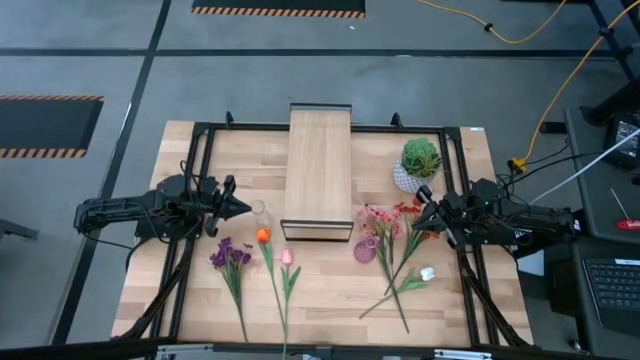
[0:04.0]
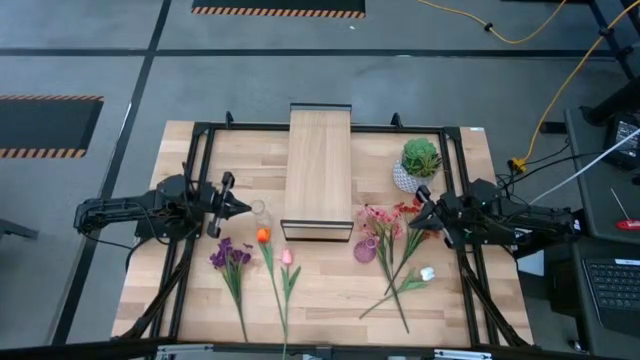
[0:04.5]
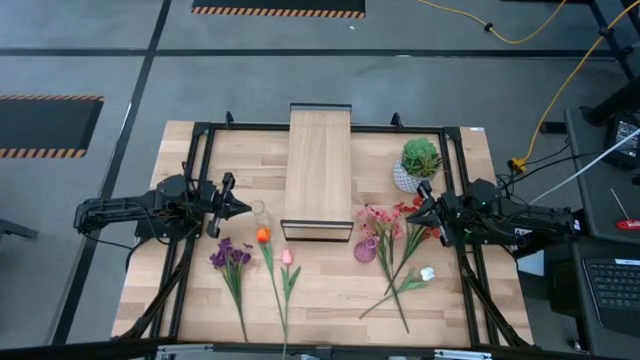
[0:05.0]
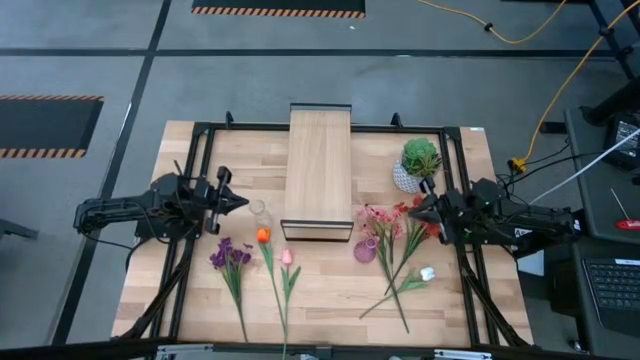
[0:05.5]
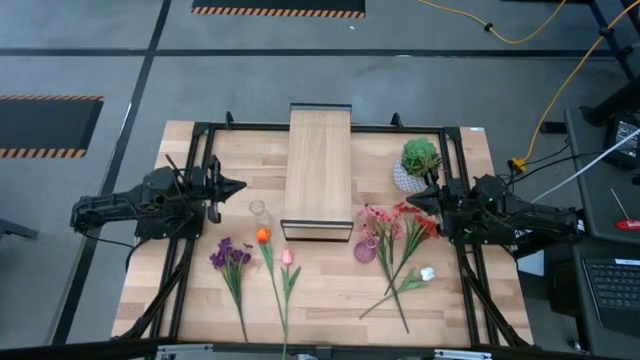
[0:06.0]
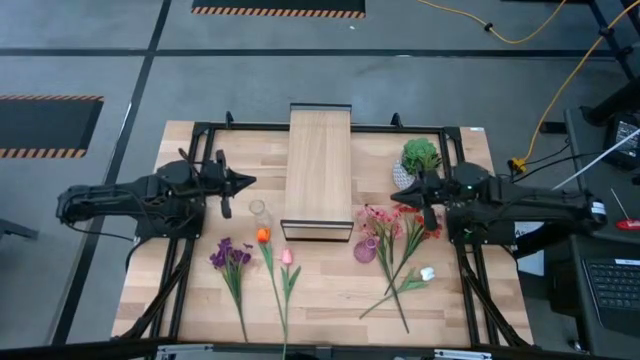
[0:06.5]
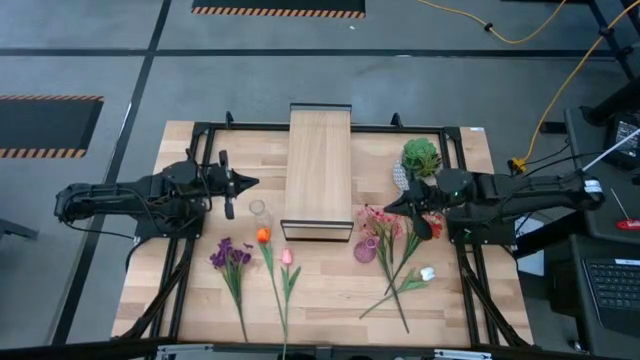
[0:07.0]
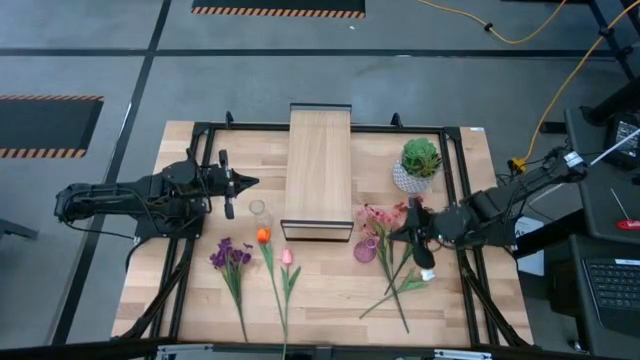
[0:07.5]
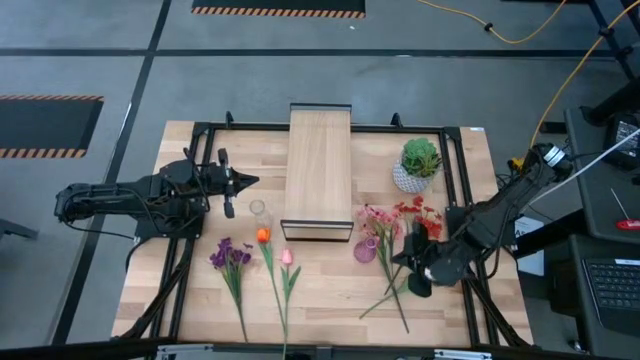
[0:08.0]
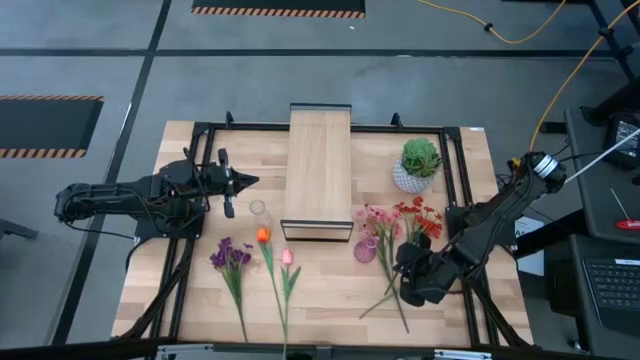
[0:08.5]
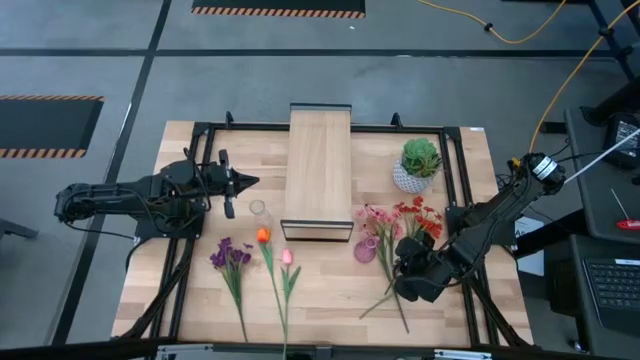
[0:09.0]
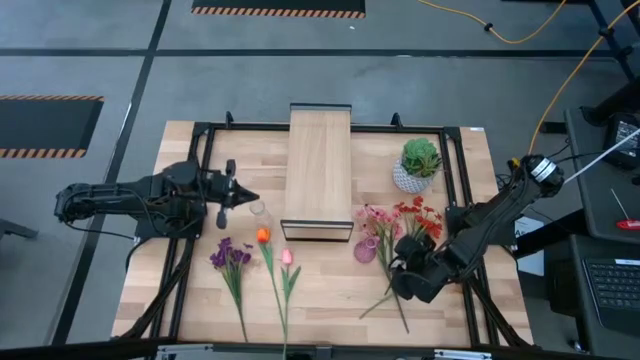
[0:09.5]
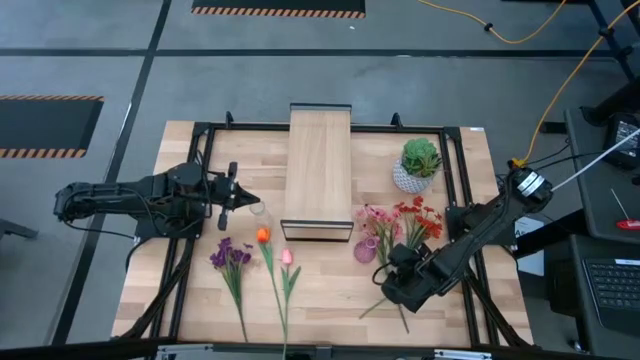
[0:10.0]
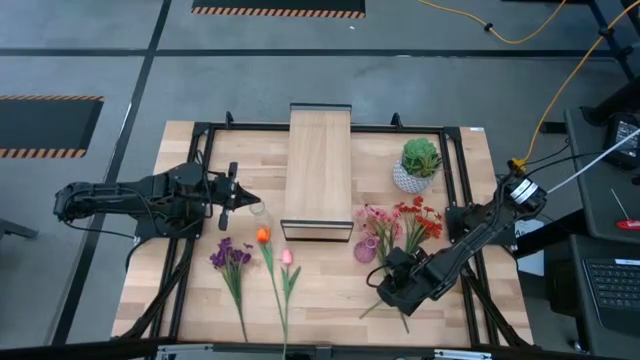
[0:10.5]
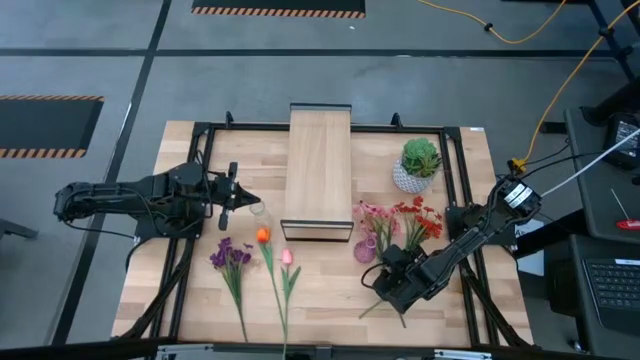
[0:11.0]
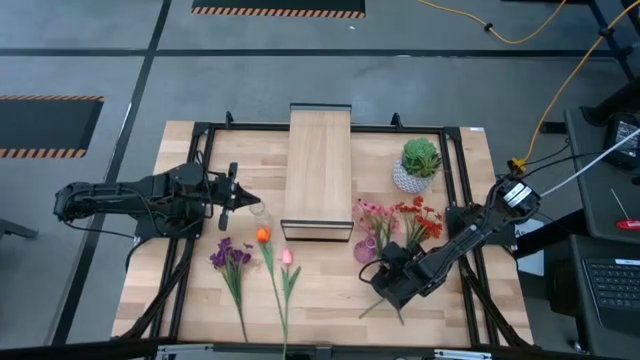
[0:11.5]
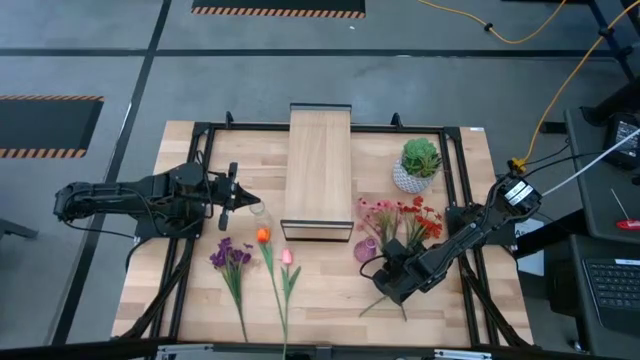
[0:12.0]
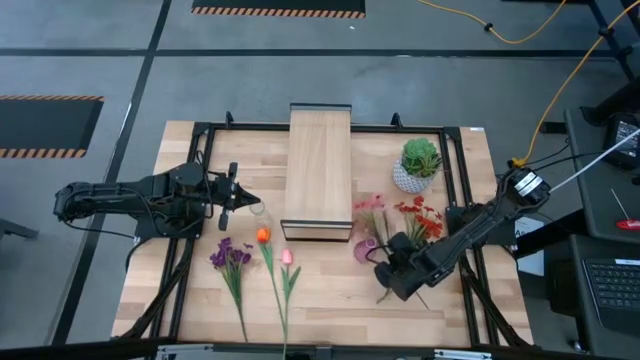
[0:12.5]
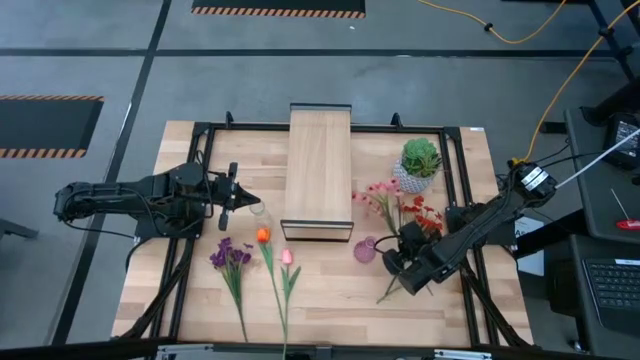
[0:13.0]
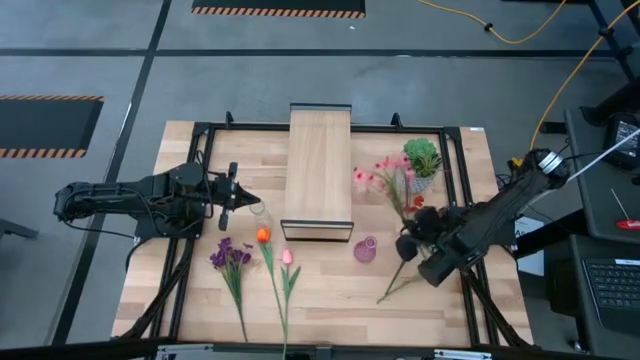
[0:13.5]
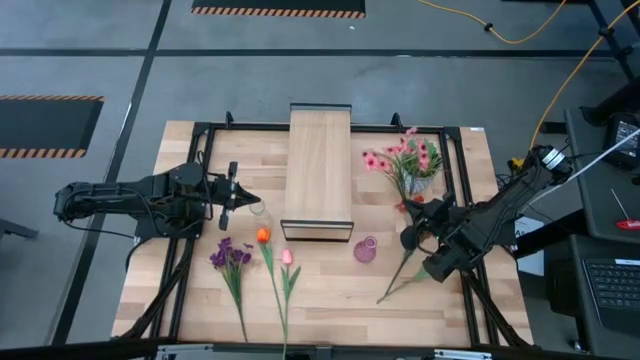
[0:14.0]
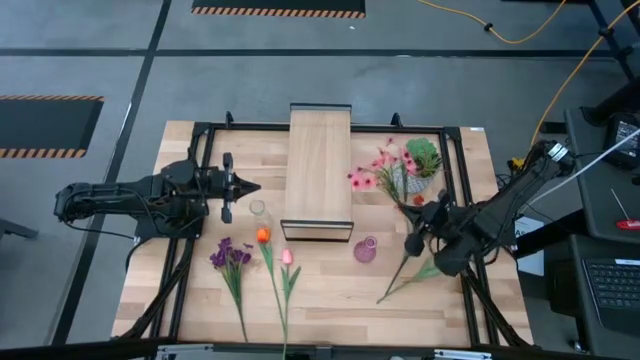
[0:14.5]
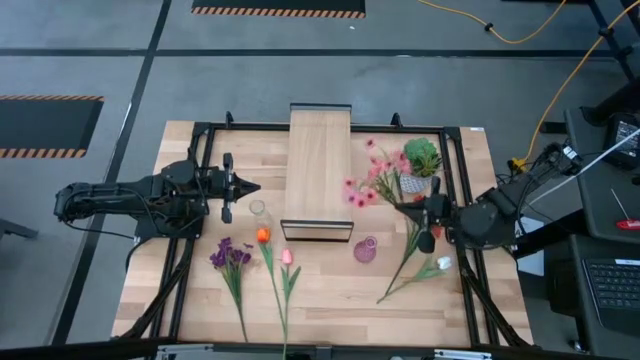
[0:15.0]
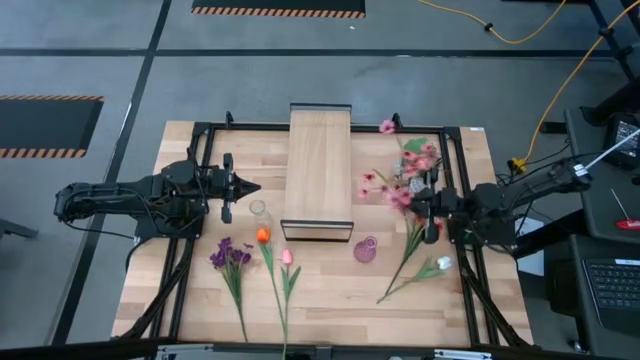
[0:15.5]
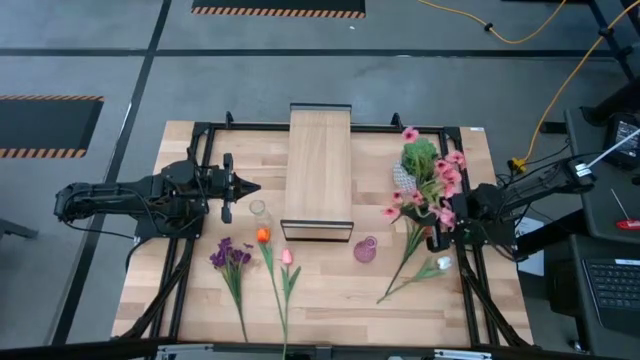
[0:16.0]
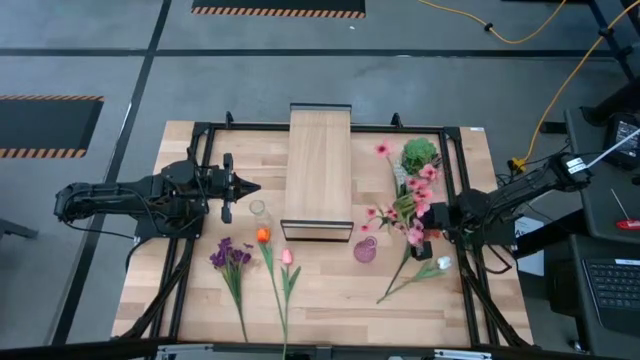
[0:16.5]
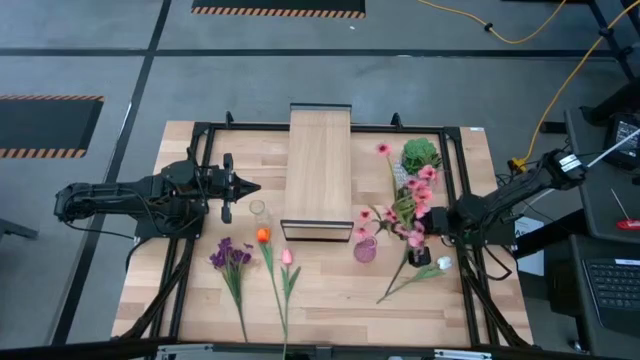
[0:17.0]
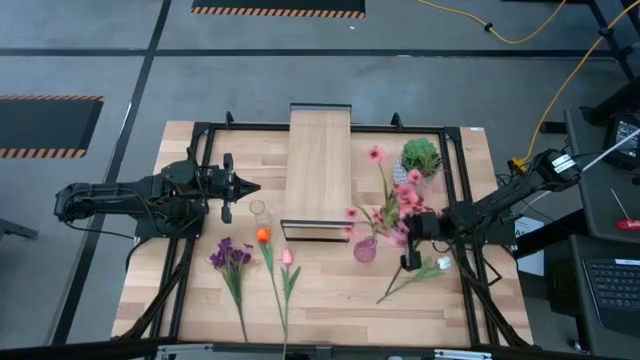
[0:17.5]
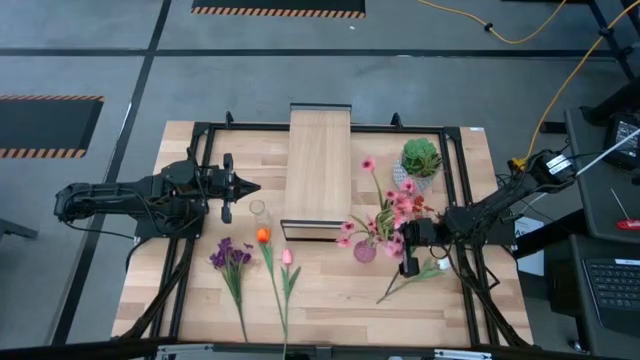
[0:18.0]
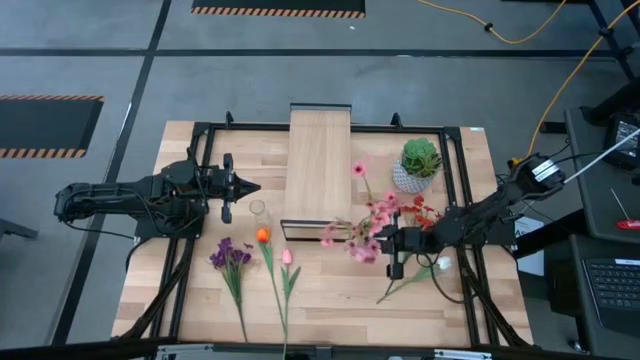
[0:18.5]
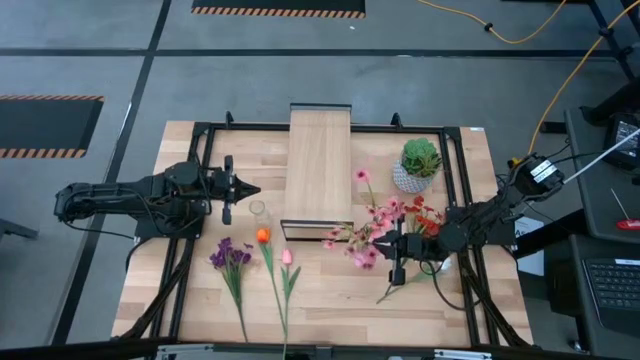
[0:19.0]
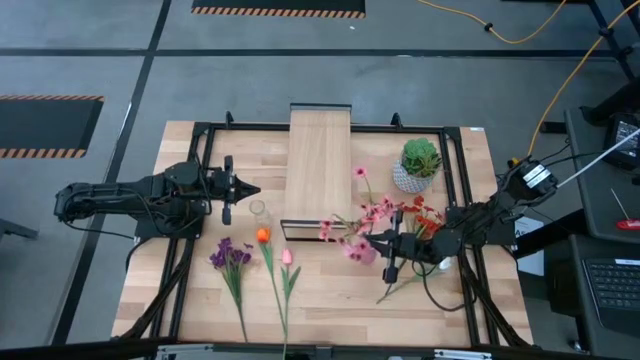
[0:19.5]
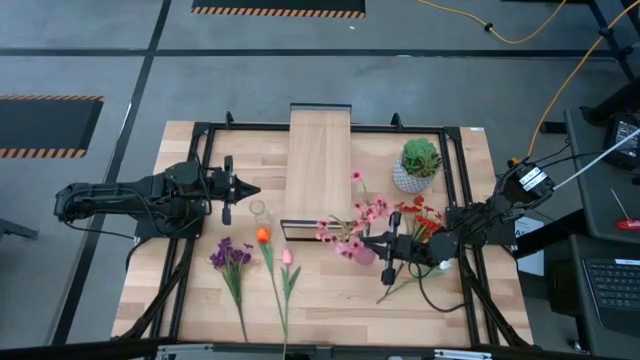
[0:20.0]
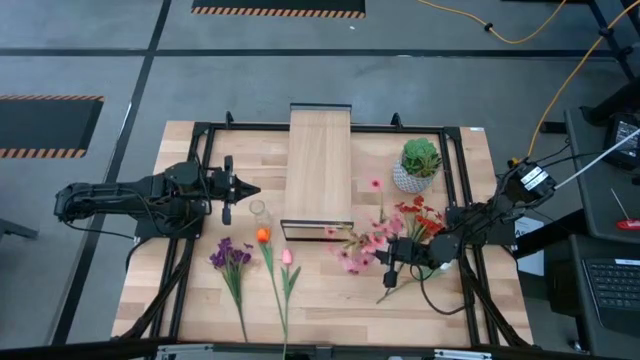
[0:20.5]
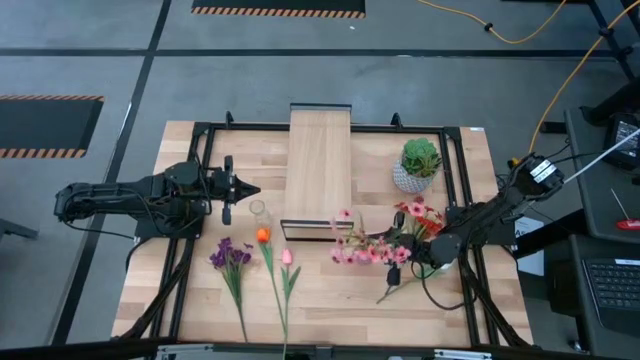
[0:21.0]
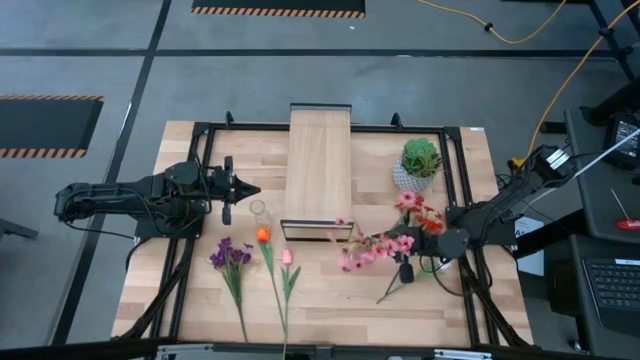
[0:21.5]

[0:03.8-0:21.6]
Task: Pick and place flowers into a vace then onto a shelf
Put the pink flowers into the purple vase
